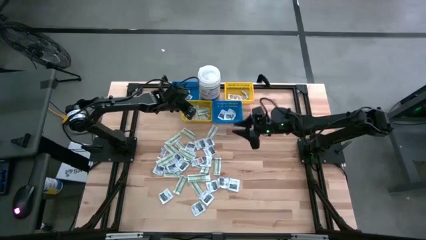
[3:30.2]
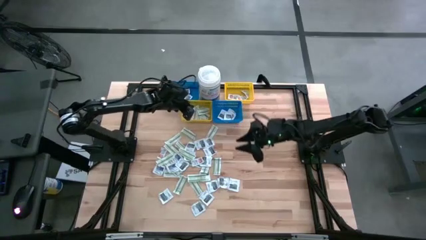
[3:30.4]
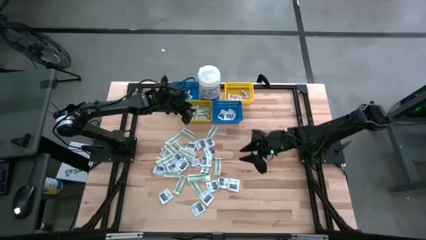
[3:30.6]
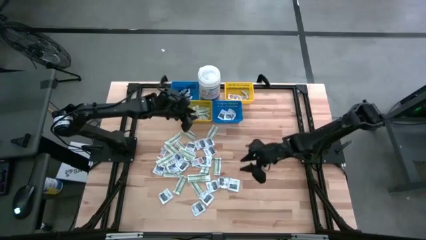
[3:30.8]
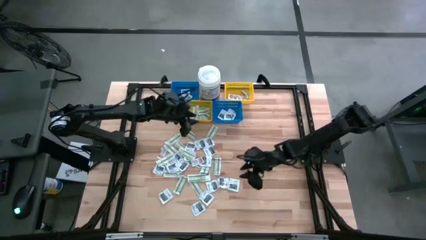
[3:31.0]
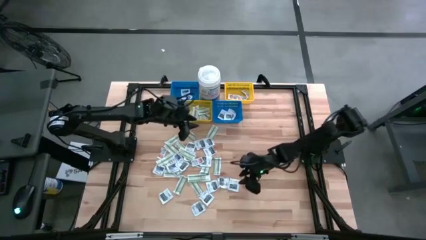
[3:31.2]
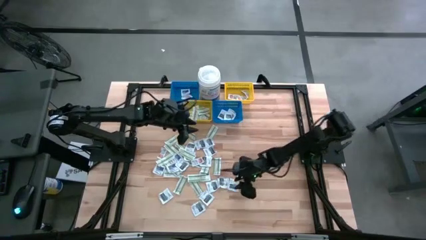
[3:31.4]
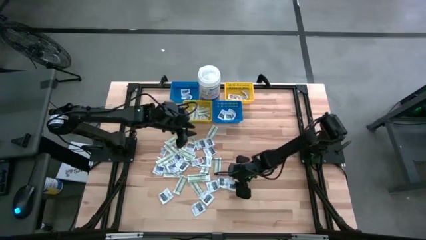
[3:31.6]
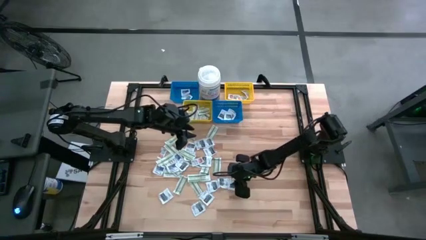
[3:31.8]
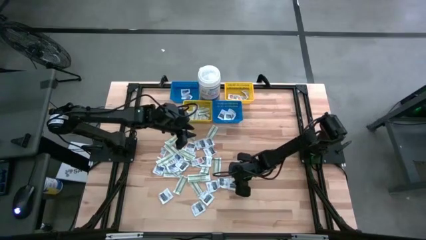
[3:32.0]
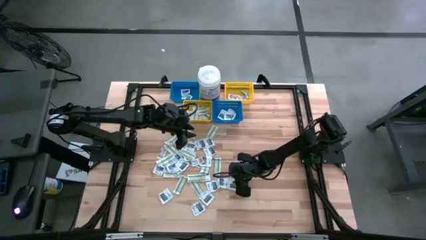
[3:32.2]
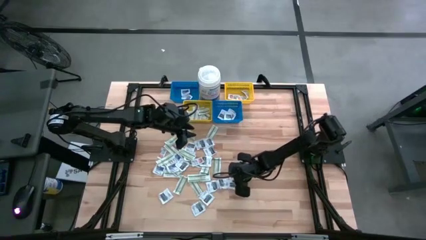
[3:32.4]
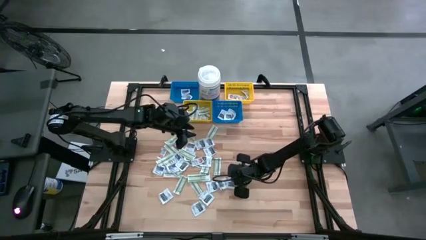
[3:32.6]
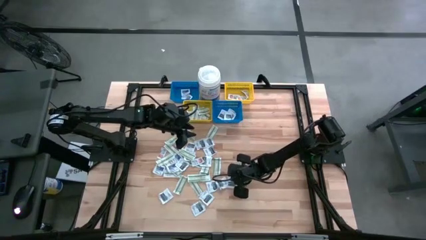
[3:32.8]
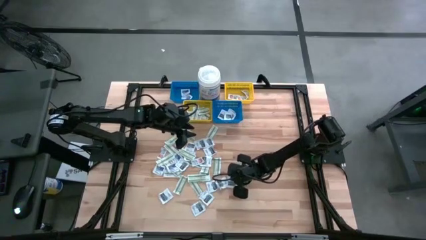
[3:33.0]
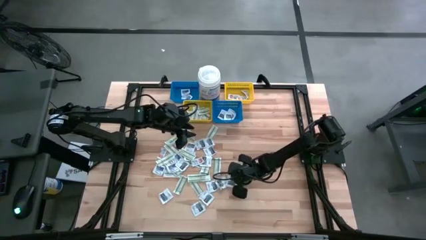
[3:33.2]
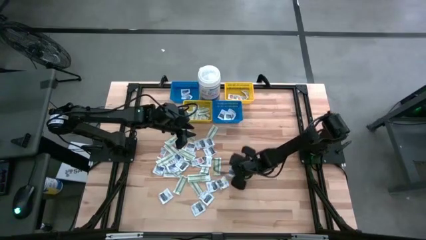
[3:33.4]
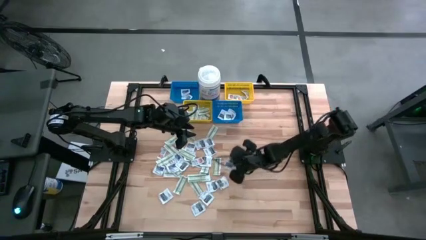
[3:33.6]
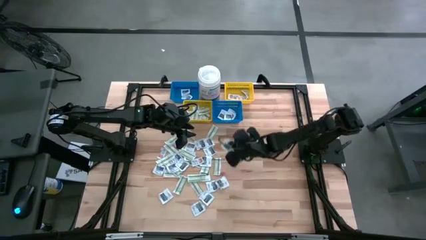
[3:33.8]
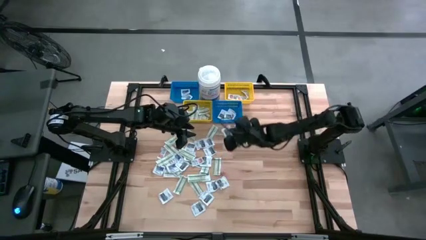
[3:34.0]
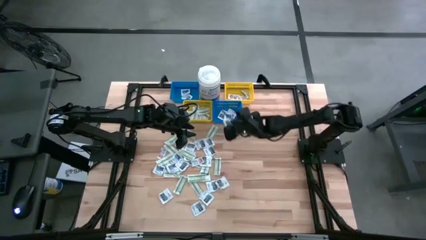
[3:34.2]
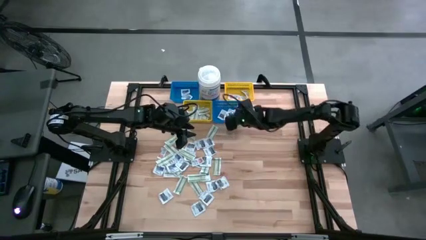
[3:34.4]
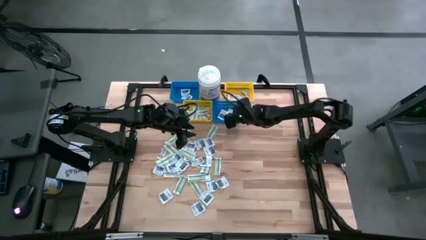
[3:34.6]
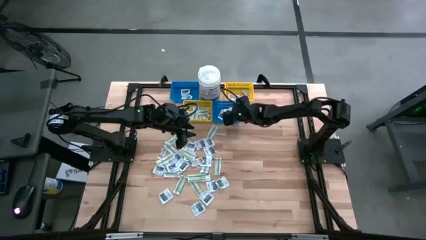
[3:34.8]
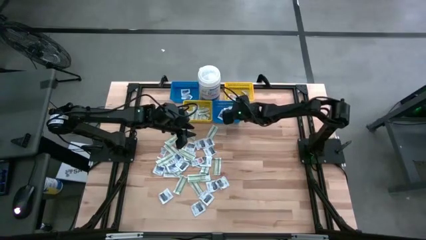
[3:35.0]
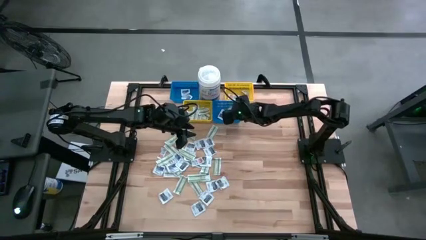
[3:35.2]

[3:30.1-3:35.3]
Task: Pick & Place First Aid Supplies
Put the black towelette pack into the right blue bin

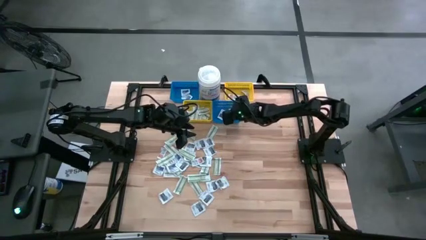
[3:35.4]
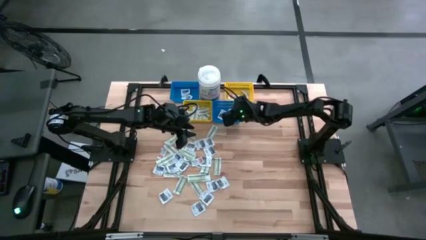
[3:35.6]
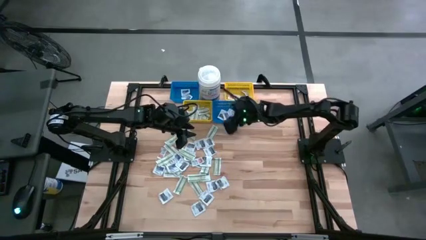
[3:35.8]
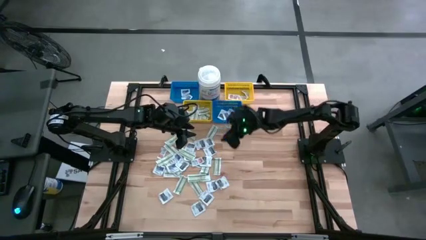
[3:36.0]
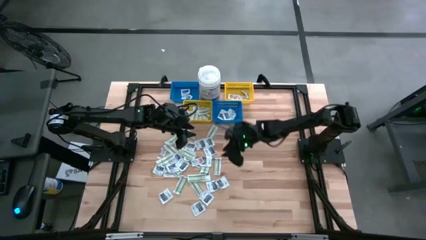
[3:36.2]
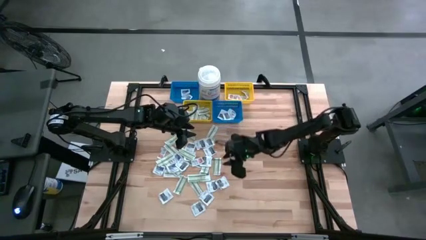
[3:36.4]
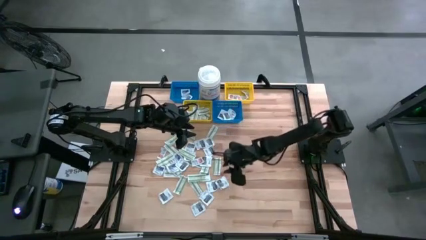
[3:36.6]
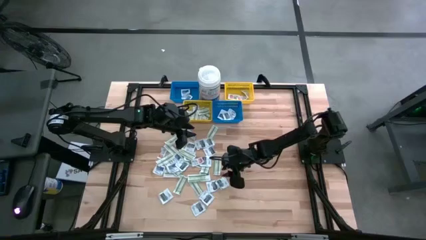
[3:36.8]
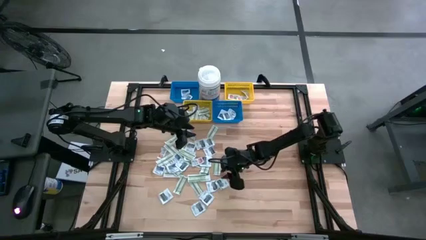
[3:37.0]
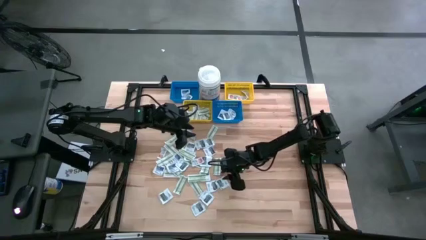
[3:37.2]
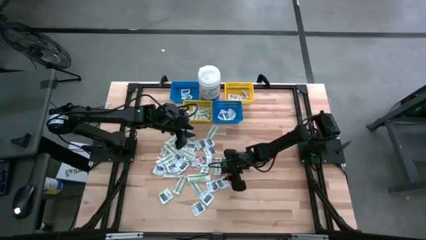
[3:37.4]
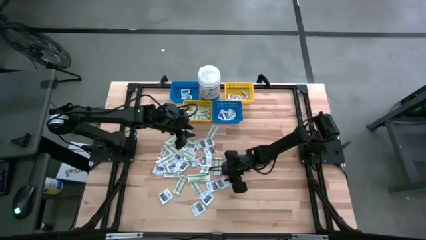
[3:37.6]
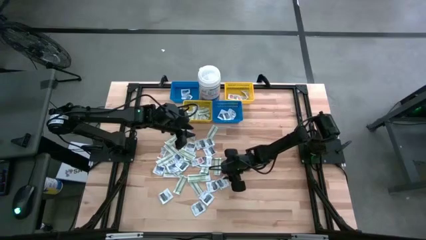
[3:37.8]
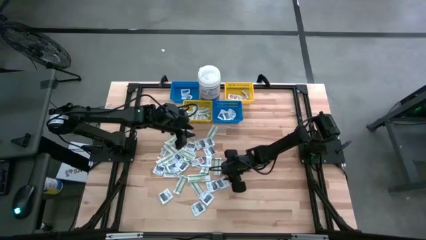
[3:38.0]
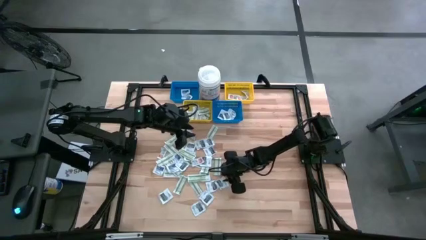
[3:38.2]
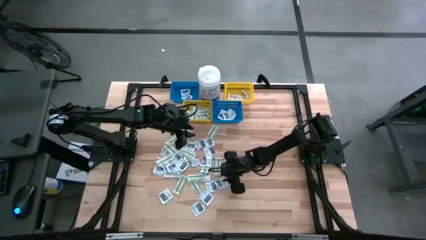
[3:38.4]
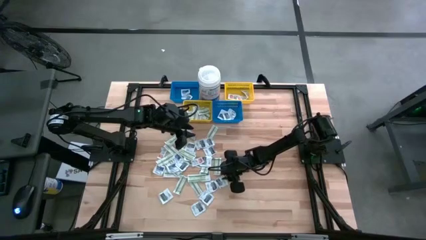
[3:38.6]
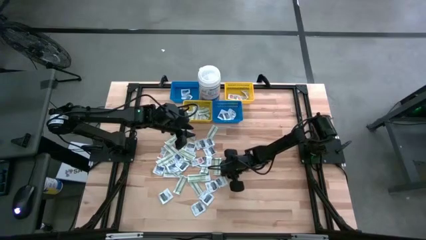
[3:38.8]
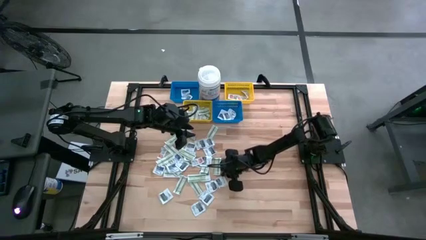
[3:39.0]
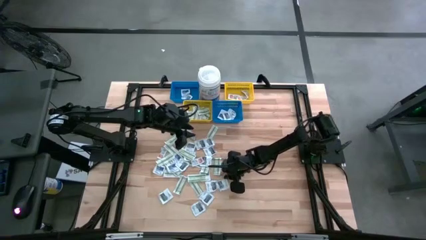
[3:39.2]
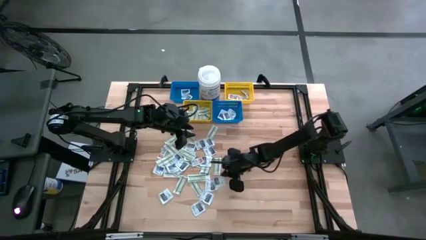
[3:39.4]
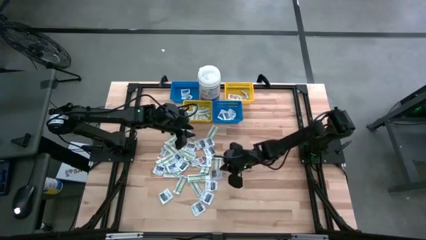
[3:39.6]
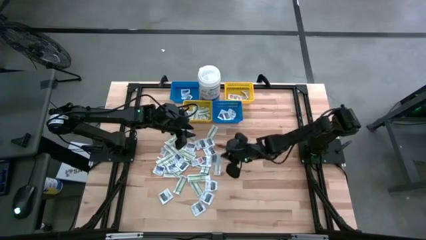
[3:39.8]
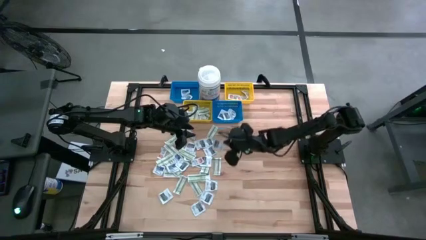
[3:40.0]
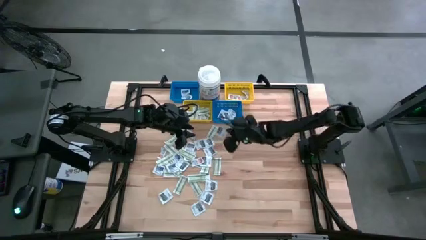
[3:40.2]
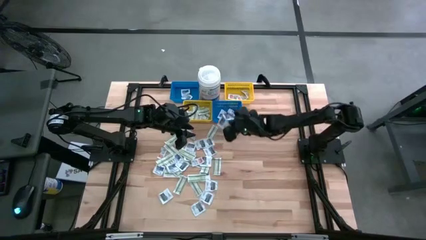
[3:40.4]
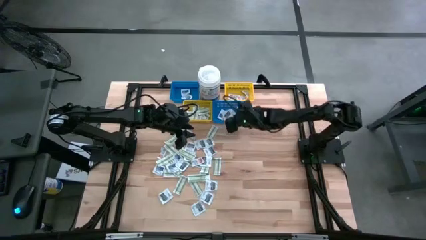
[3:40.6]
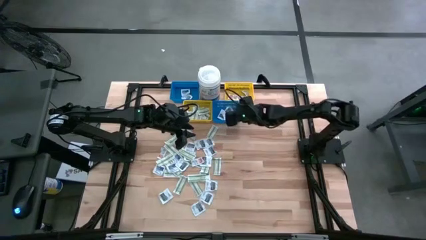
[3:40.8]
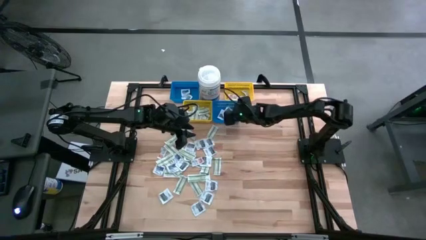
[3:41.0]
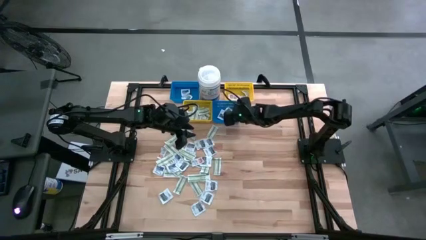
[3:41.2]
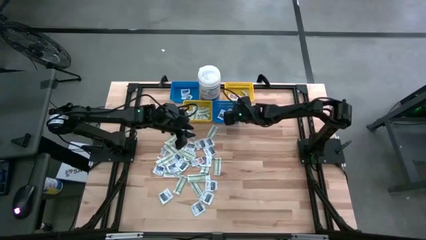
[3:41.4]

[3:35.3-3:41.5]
Put the black towelette pack into the right blue bin

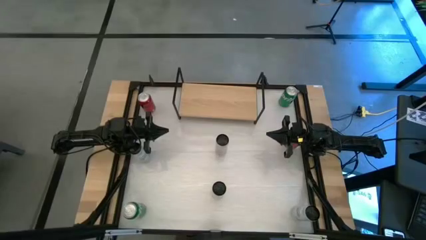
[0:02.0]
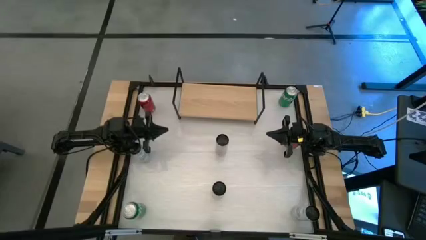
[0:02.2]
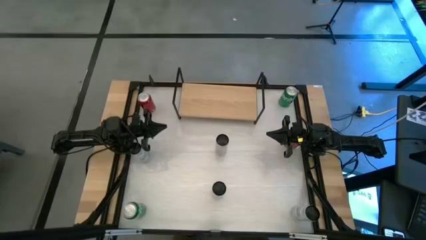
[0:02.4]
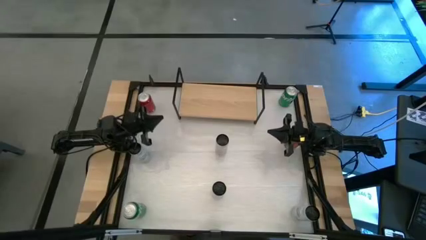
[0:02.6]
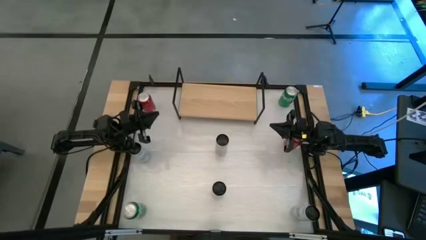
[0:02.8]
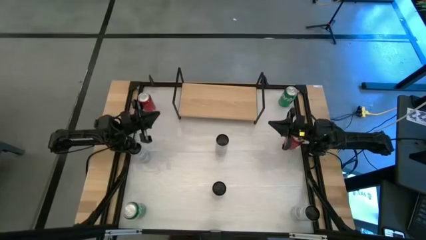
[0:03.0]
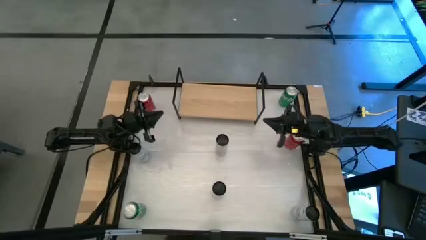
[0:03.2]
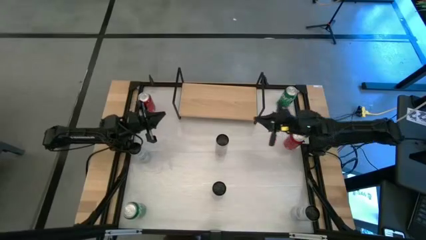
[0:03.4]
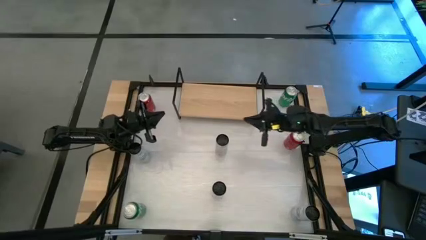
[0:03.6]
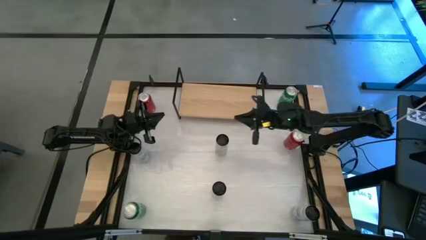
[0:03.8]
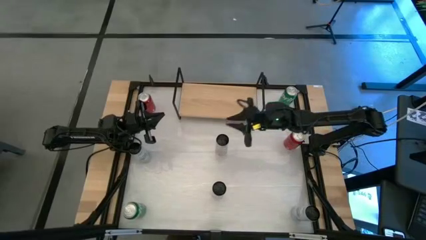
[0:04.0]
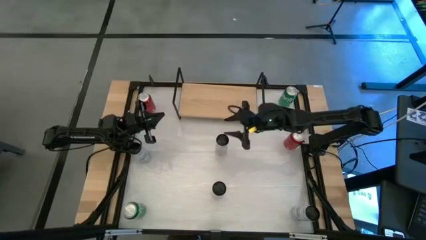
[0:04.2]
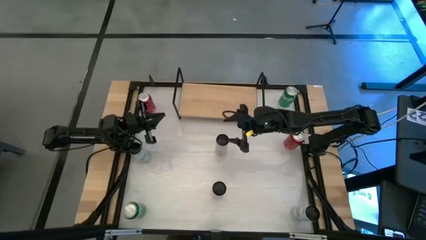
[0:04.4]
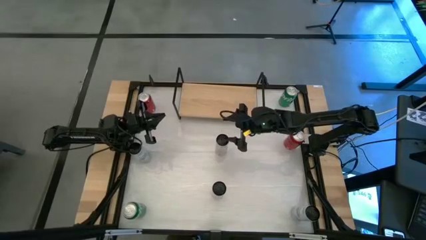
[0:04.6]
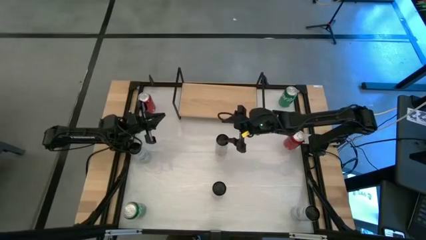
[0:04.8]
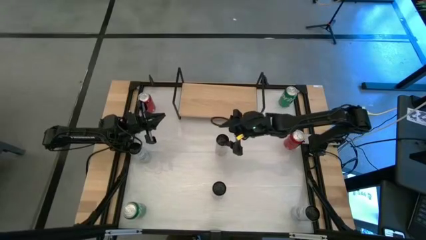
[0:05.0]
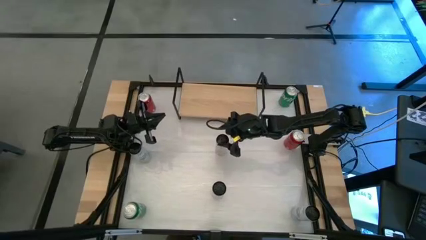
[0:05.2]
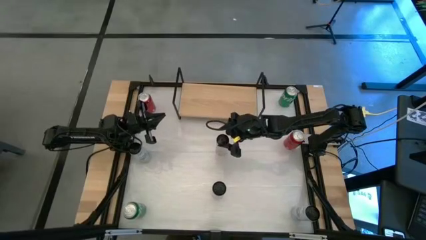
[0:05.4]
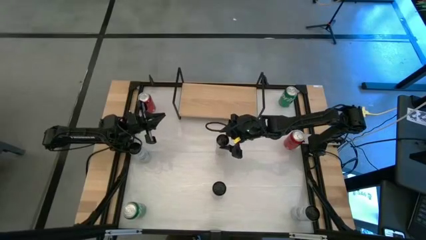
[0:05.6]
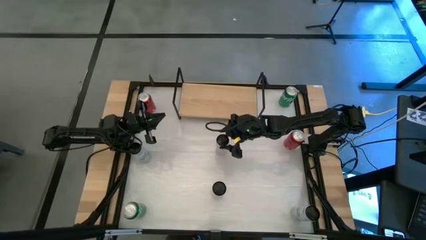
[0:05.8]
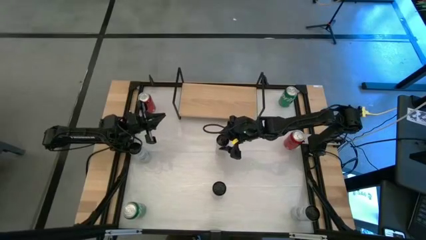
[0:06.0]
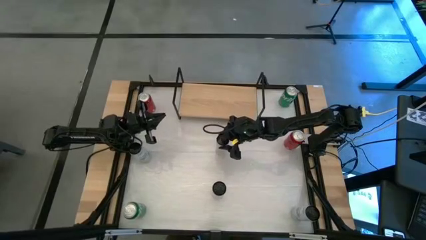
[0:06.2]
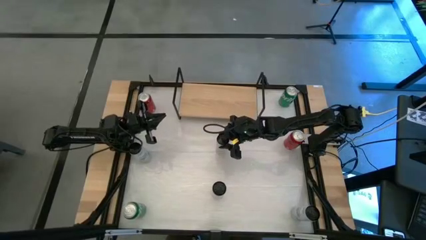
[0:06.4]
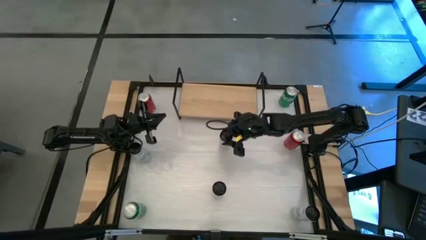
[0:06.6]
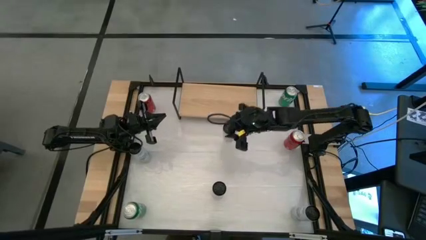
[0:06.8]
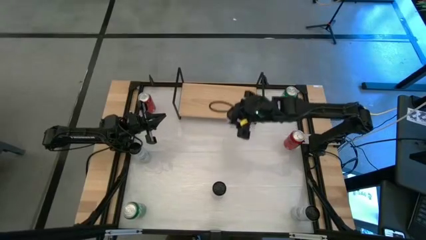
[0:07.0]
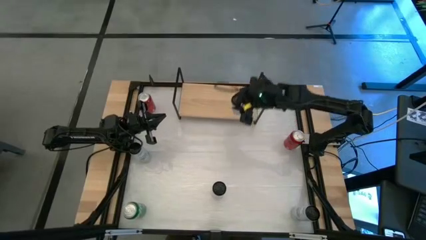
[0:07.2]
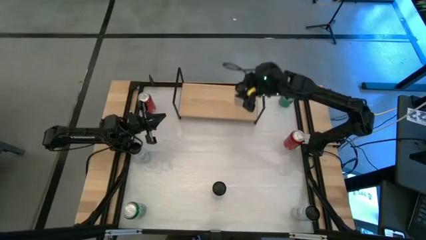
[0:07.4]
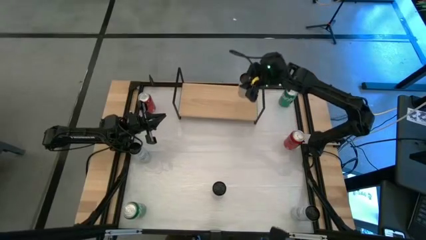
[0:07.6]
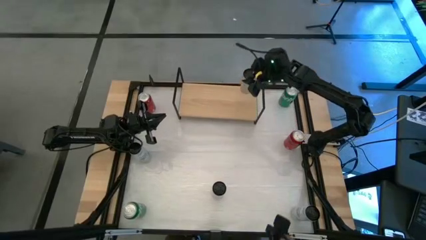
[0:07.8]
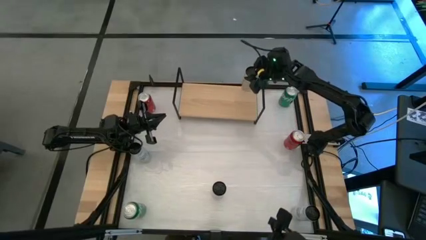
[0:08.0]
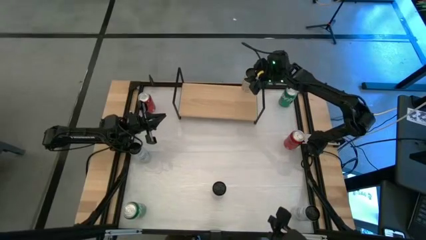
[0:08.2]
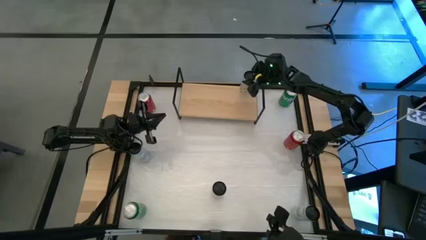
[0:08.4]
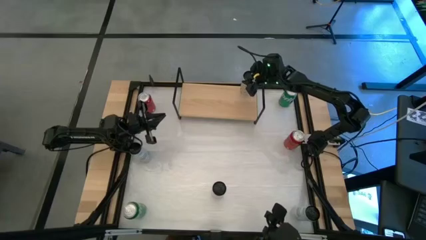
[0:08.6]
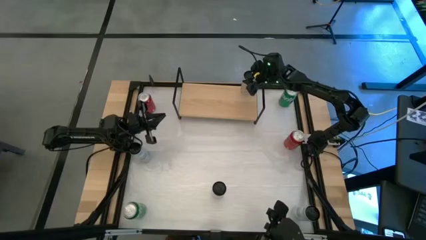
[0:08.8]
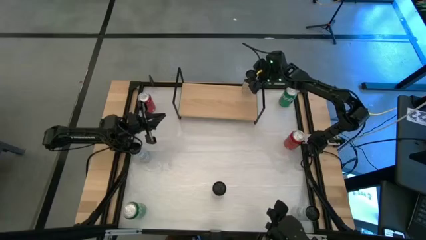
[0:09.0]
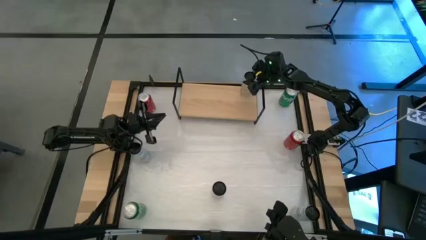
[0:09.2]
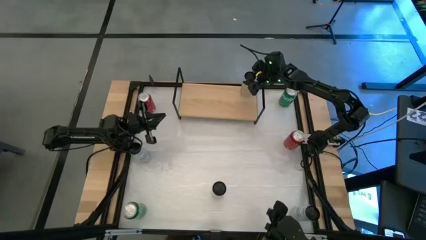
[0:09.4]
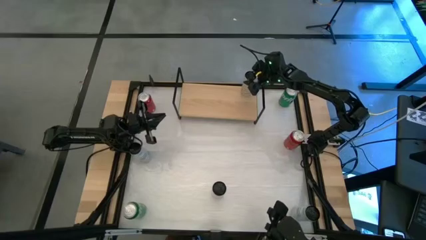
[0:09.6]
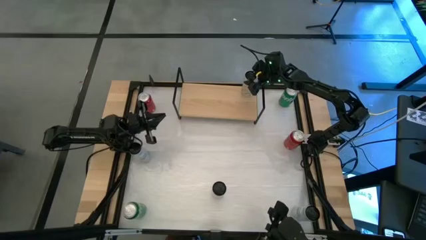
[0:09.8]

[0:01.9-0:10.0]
Task: Place canned beverage on shelf
Put the top white yellow soda can on the shelf
